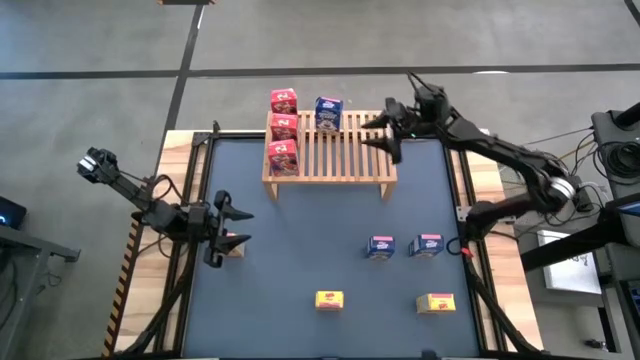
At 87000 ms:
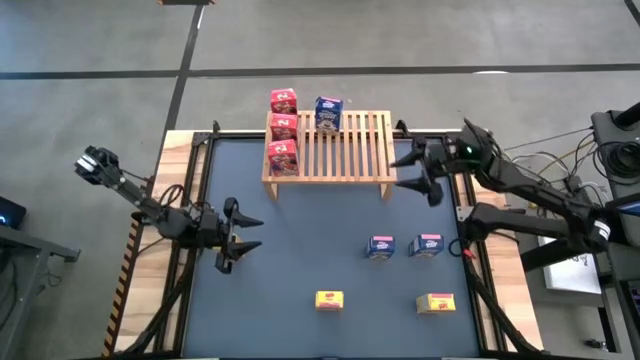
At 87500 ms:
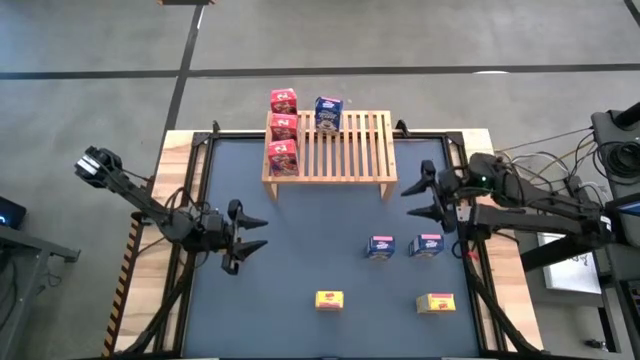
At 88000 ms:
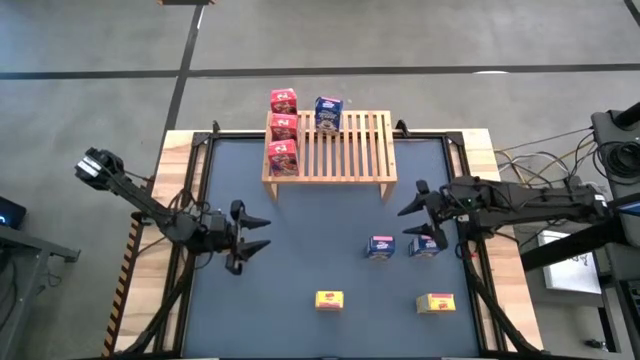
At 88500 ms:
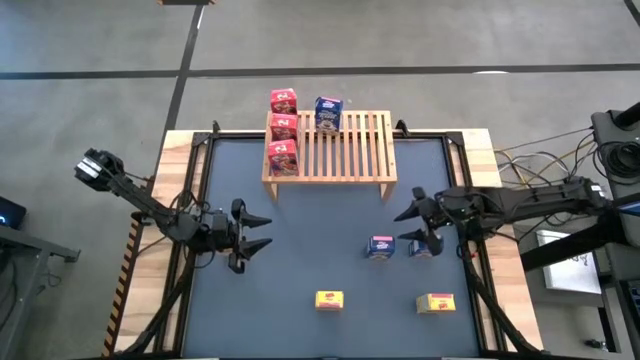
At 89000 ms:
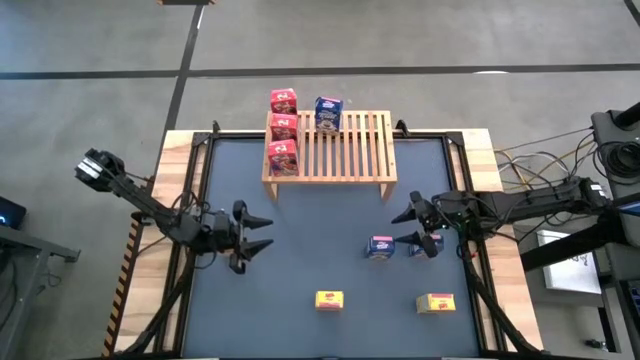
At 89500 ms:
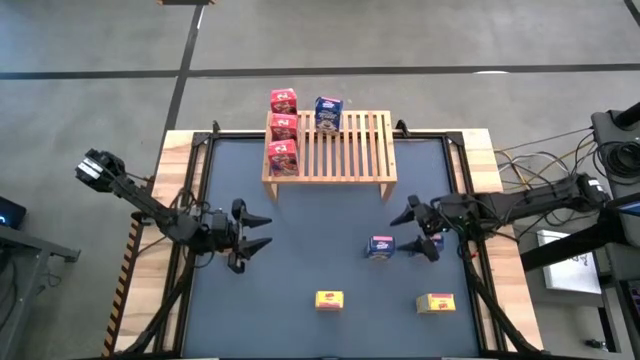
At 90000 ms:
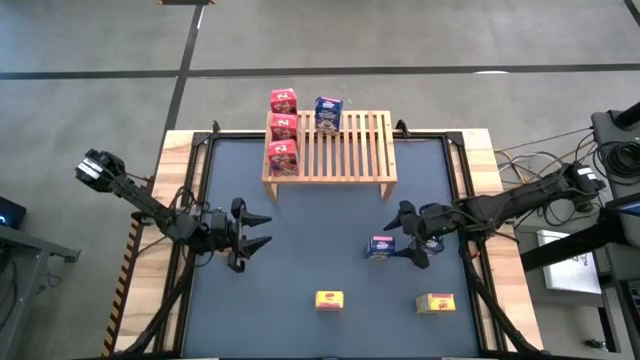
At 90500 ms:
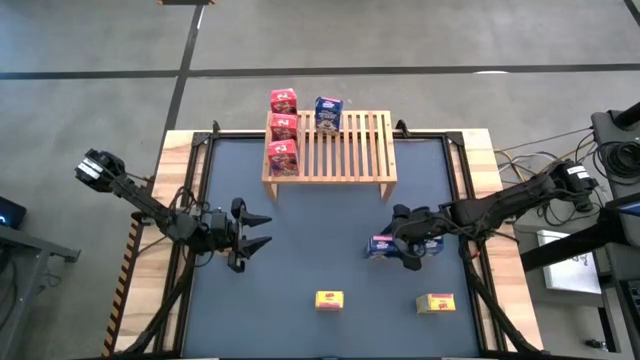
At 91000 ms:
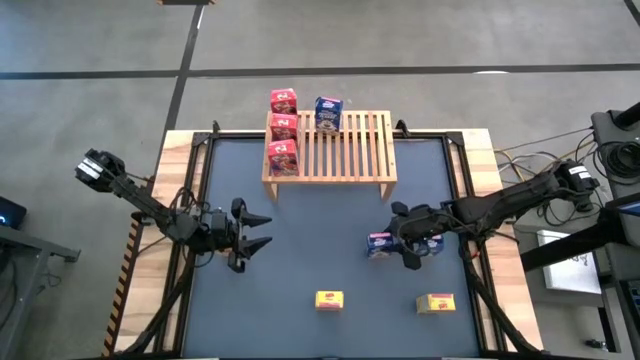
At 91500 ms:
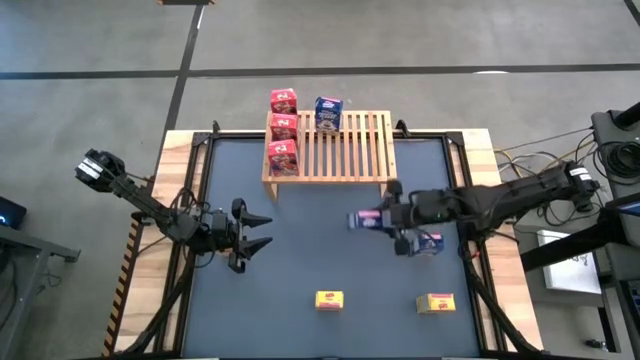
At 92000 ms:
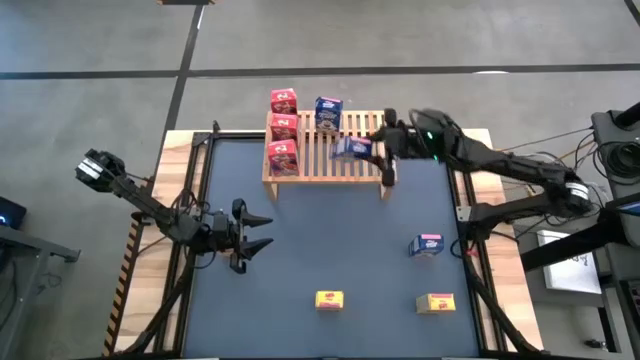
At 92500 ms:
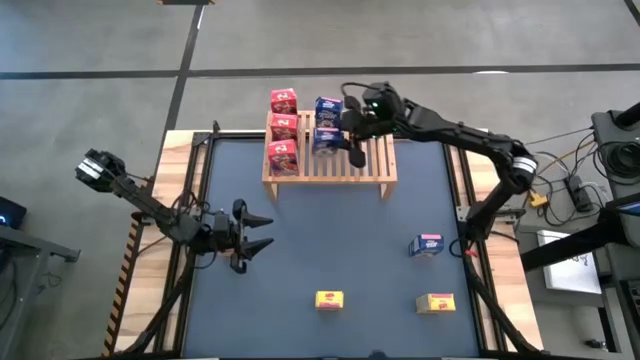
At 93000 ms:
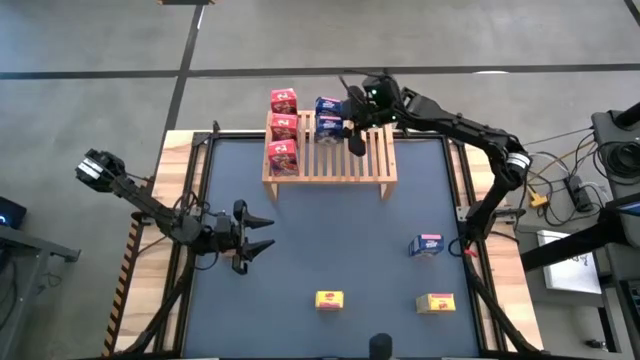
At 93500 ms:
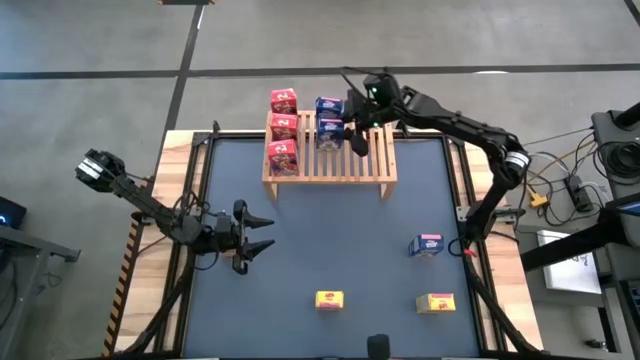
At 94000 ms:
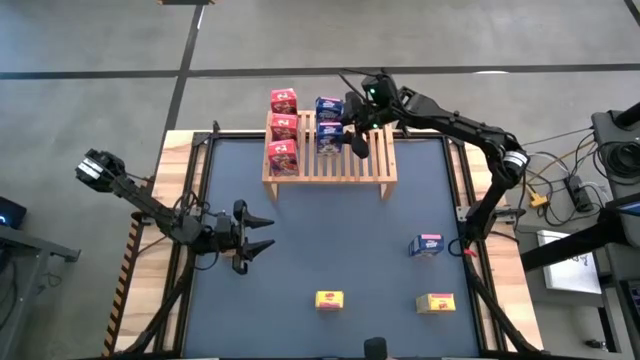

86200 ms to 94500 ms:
Task: Stack cereal on shelf
Put the left blue cereal box aligned with the other blue cereal box on the shelf

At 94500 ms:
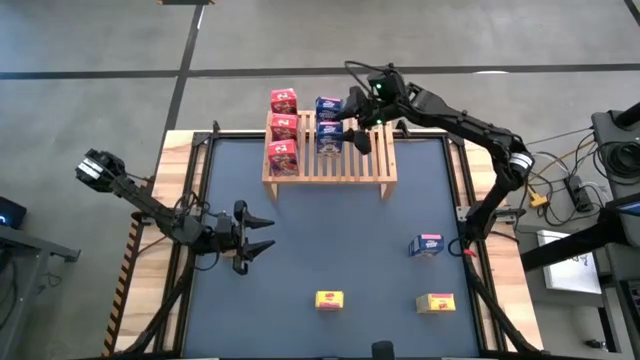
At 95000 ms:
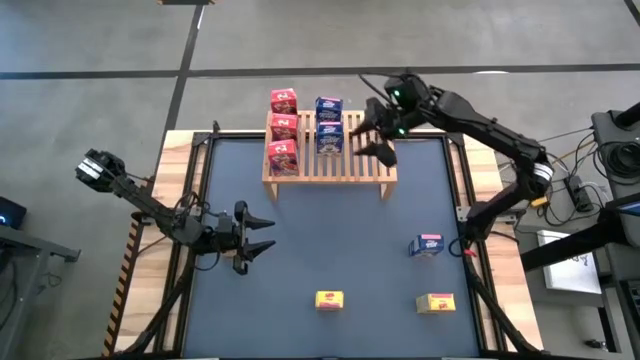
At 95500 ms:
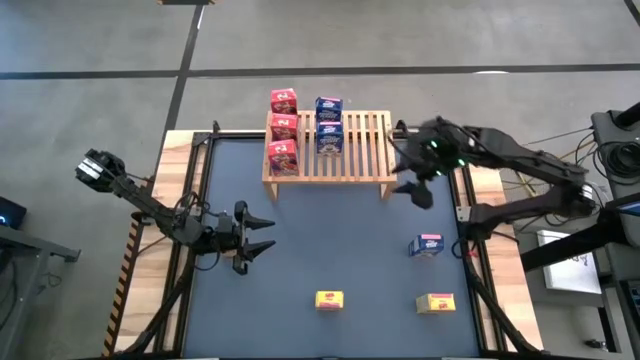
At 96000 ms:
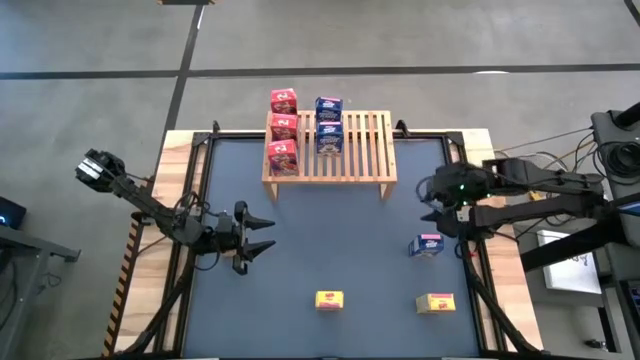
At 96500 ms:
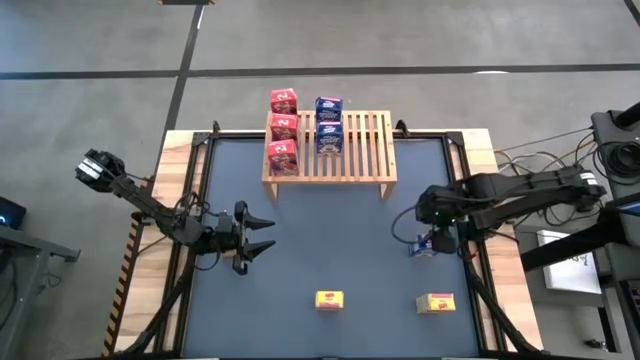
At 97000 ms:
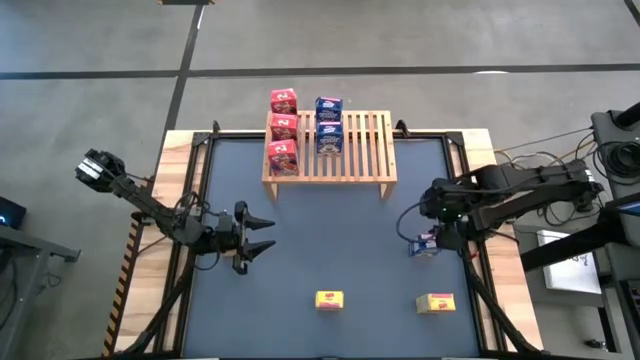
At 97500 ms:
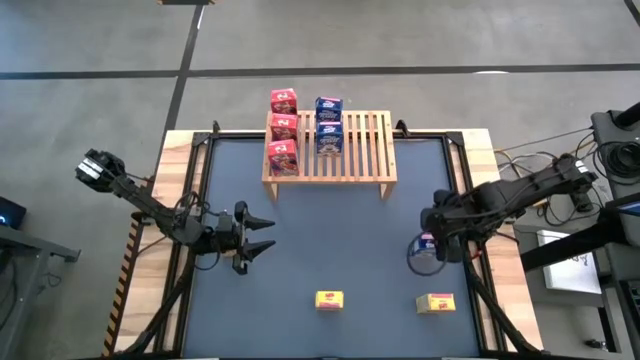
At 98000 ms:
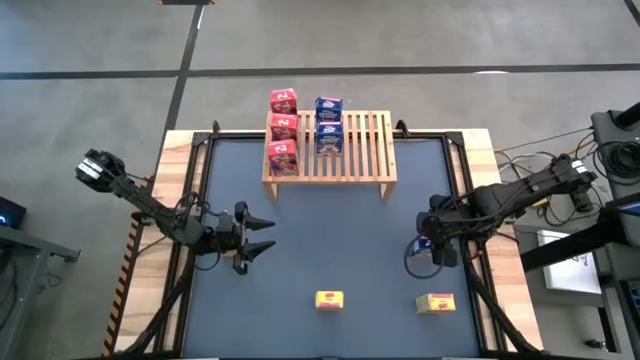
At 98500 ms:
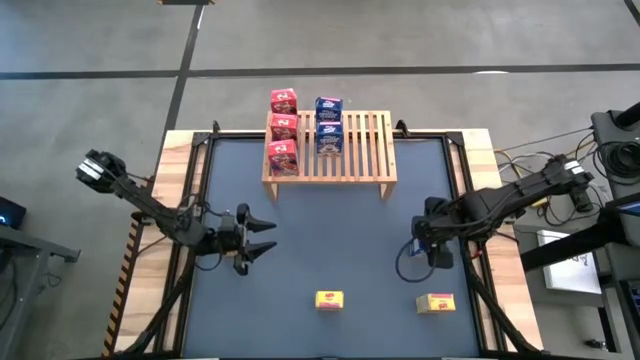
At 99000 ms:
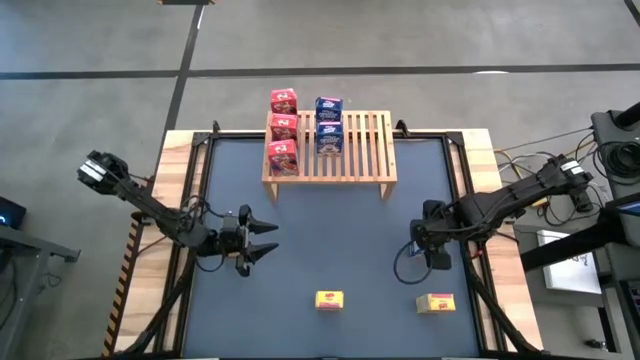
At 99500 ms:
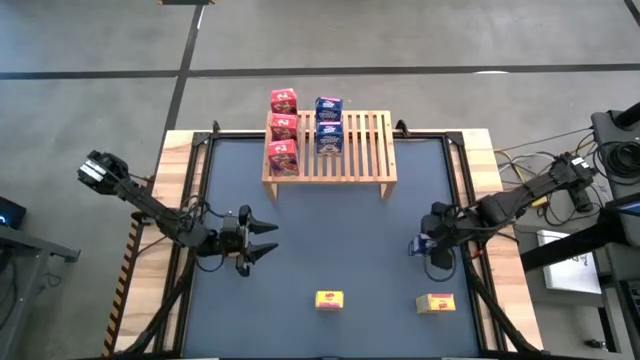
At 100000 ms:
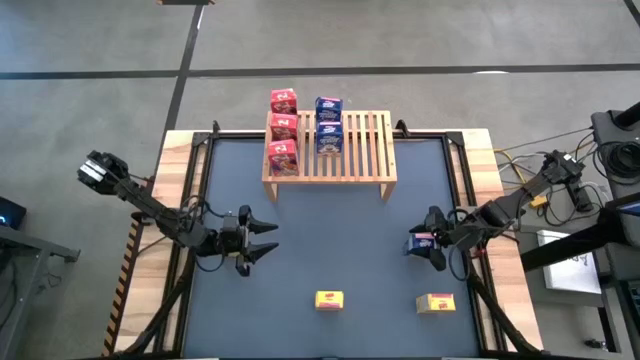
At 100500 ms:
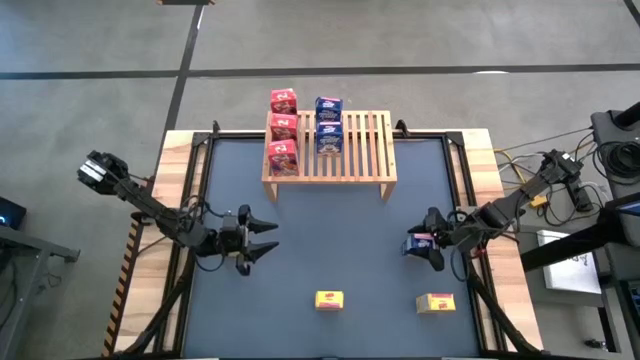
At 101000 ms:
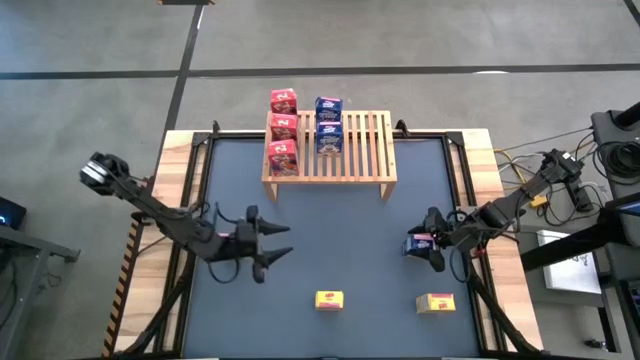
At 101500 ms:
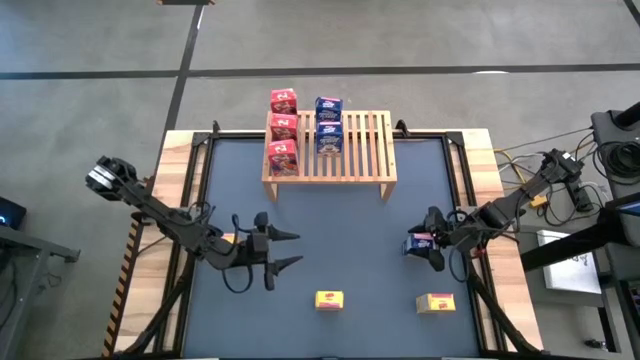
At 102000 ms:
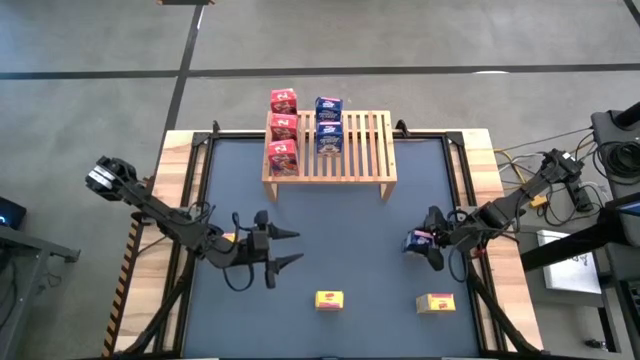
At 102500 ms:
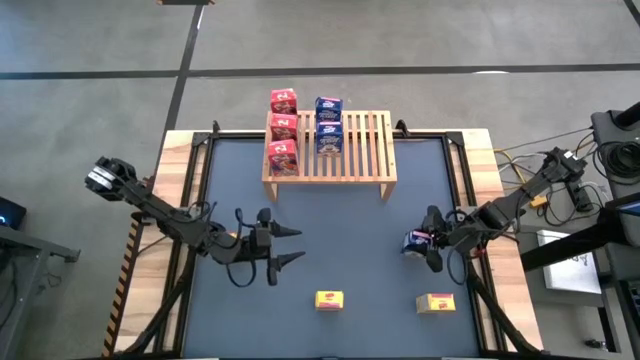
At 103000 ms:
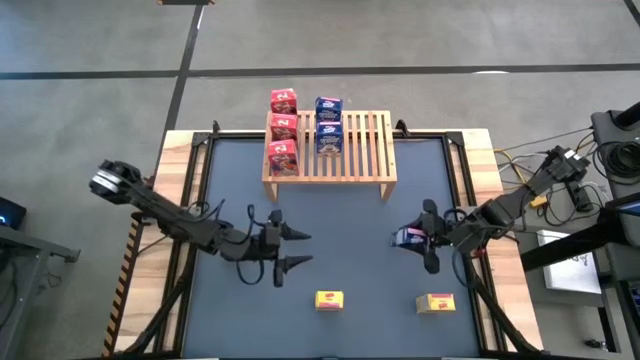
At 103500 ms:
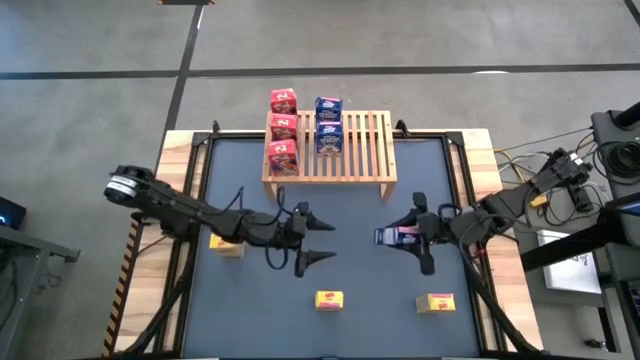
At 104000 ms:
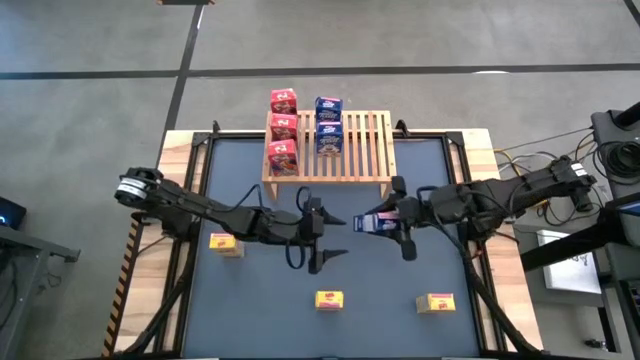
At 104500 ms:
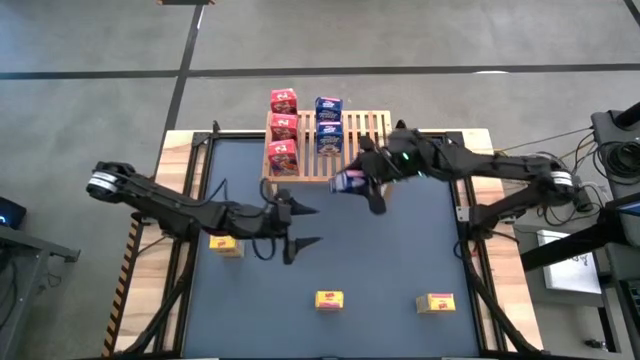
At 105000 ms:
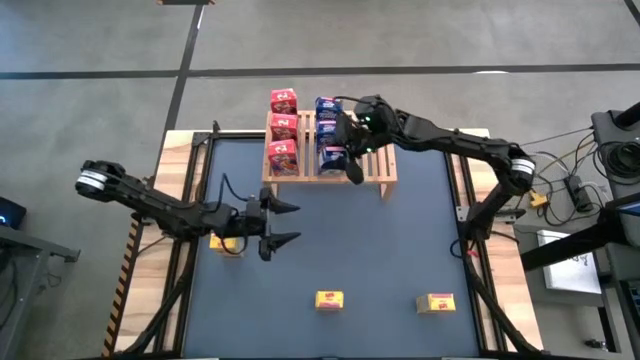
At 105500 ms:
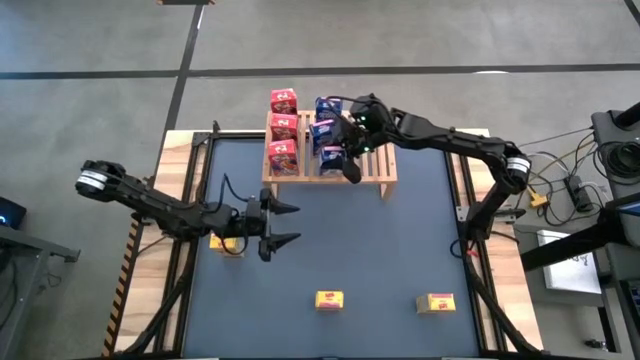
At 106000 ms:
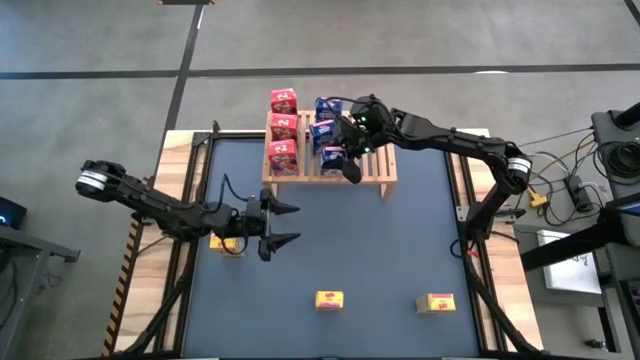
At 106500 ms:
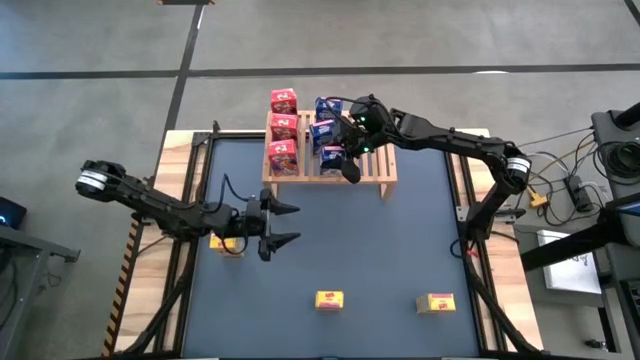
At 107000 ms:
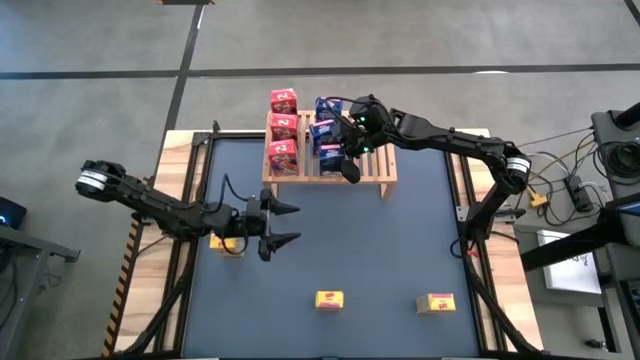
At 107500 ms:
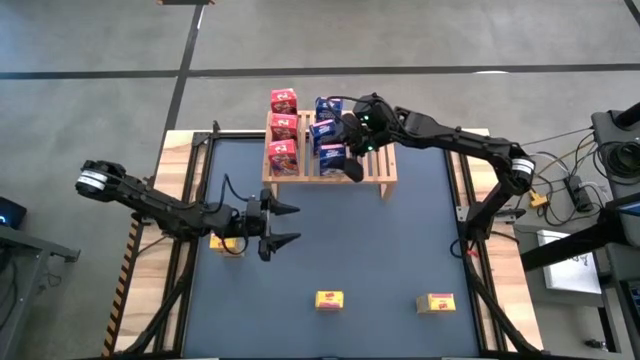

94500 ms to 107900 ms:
Put the blue cereal box aligned with the other blue cereal boxes on the shelf
